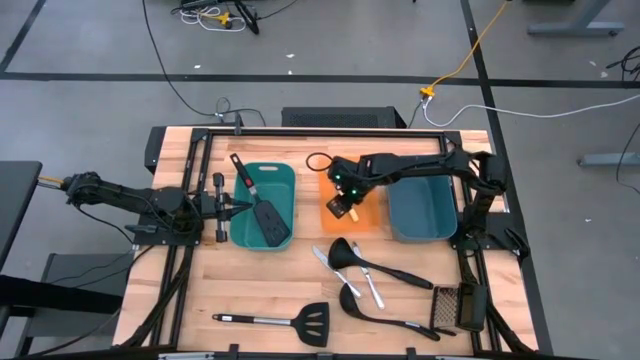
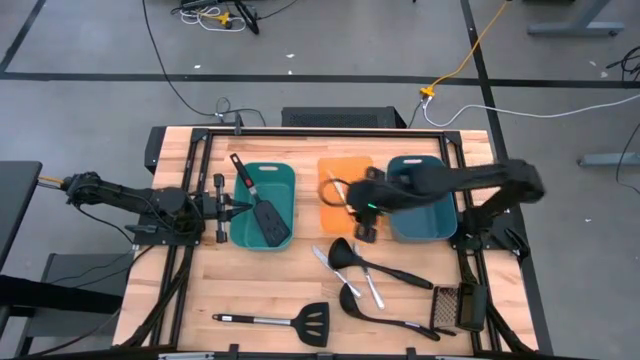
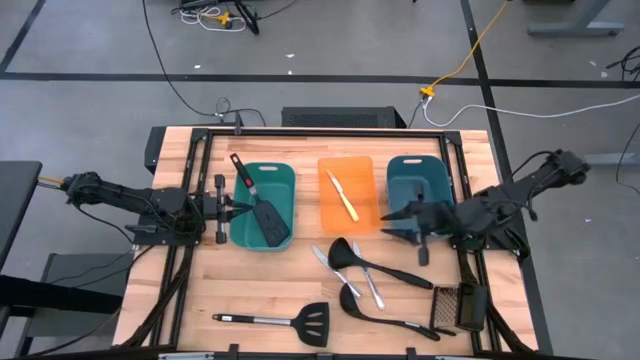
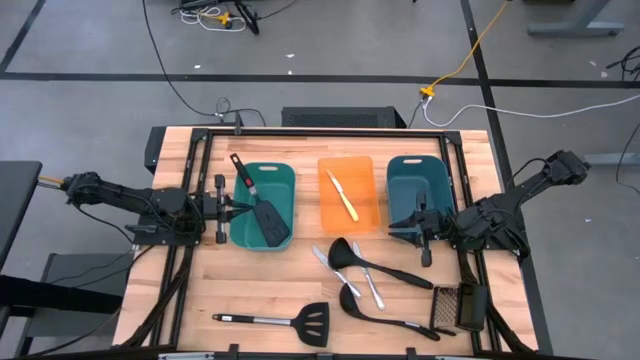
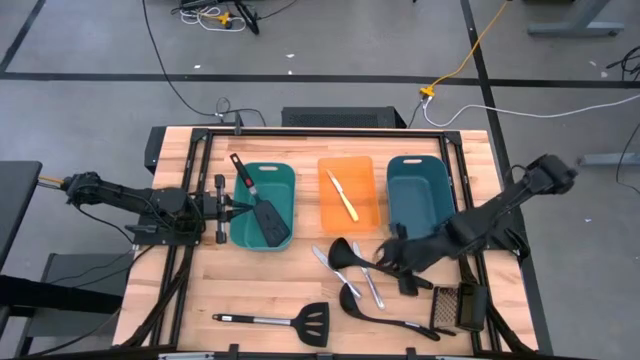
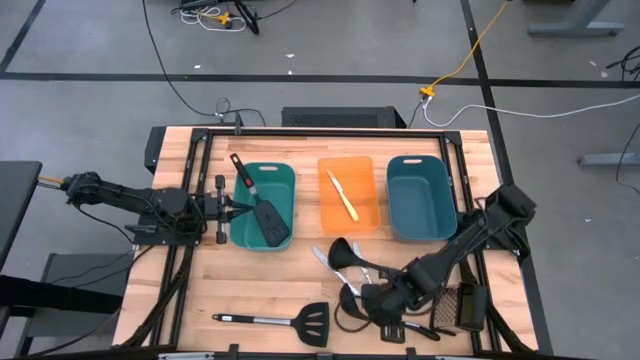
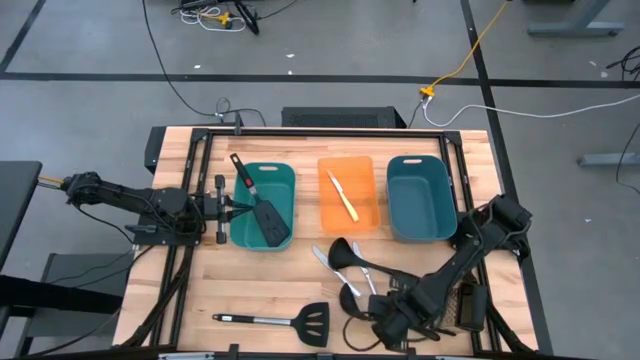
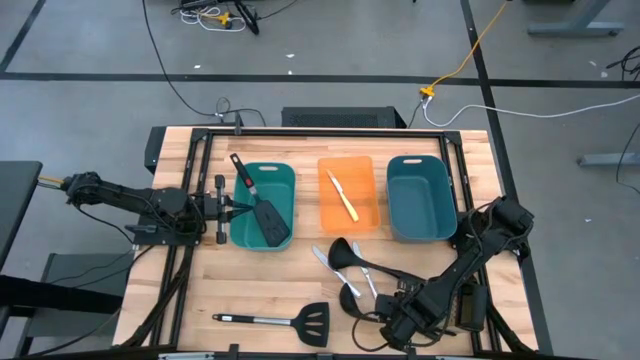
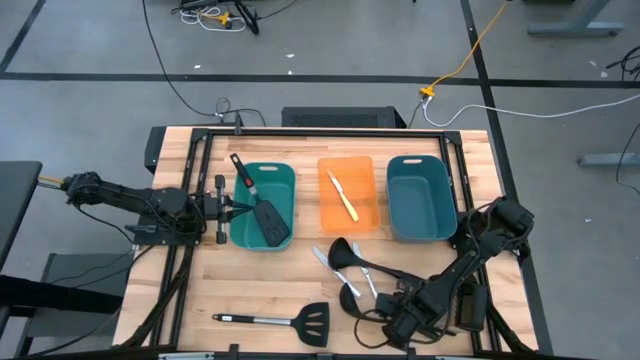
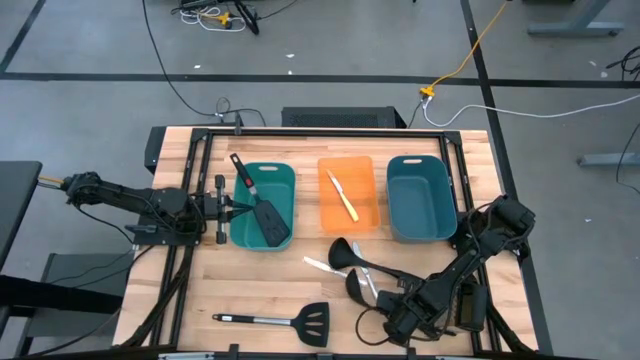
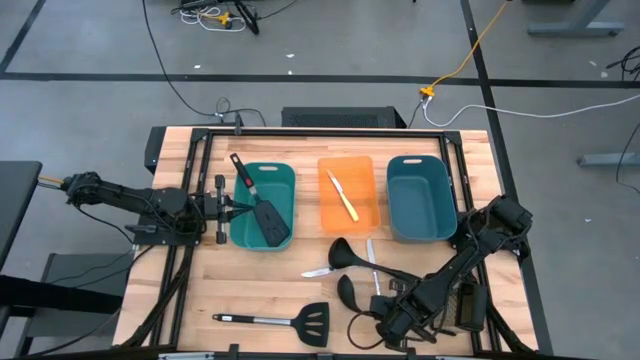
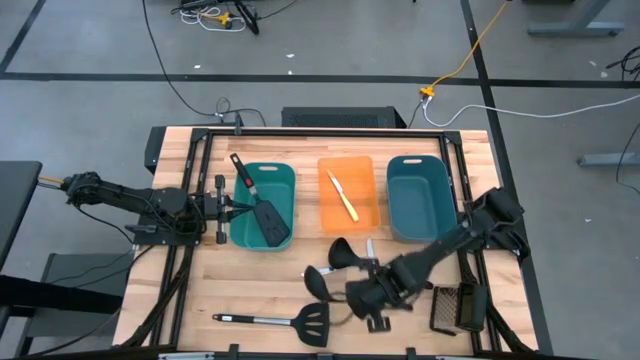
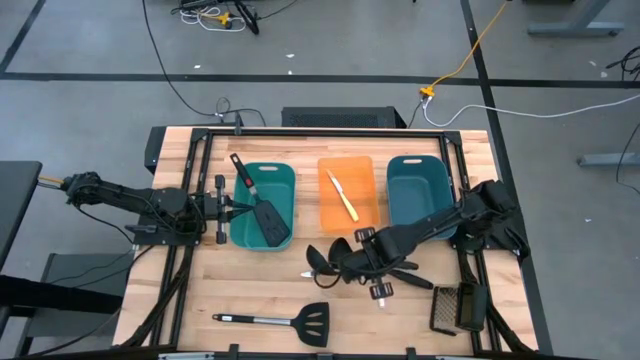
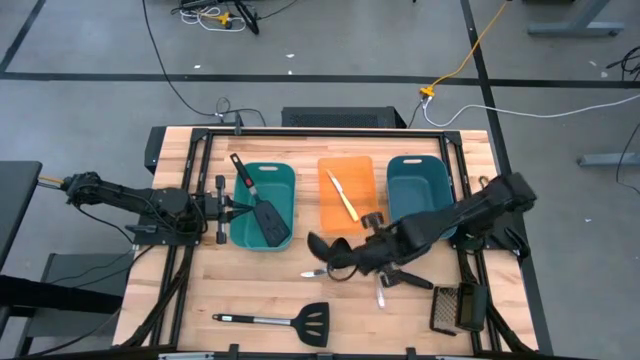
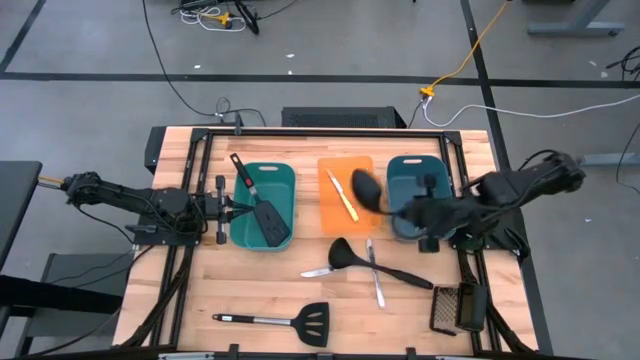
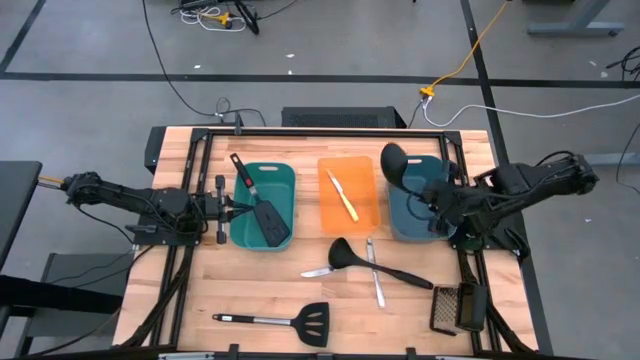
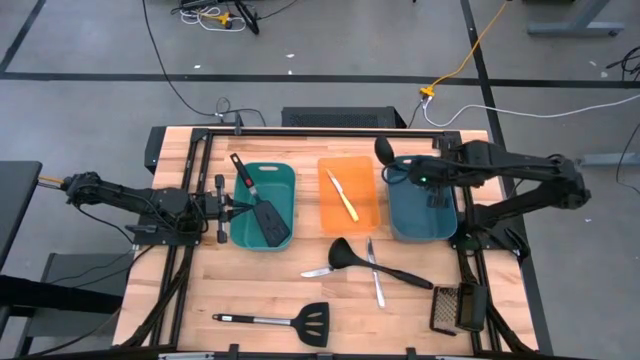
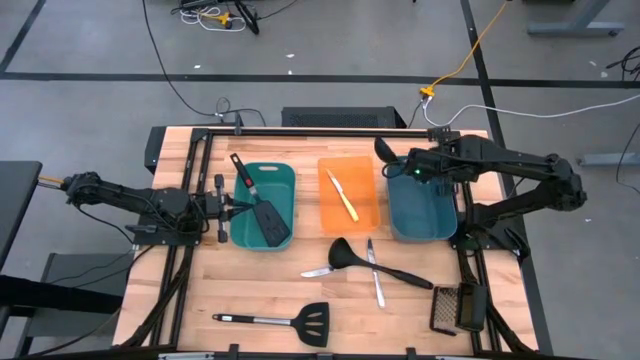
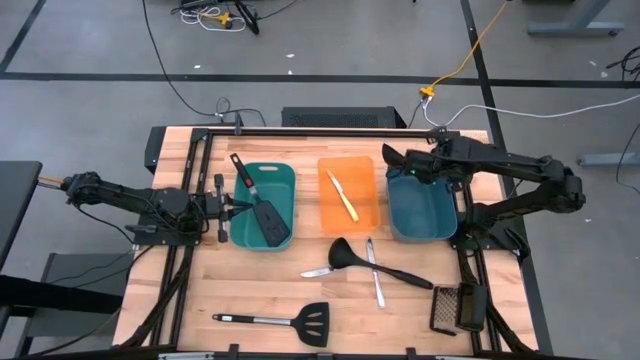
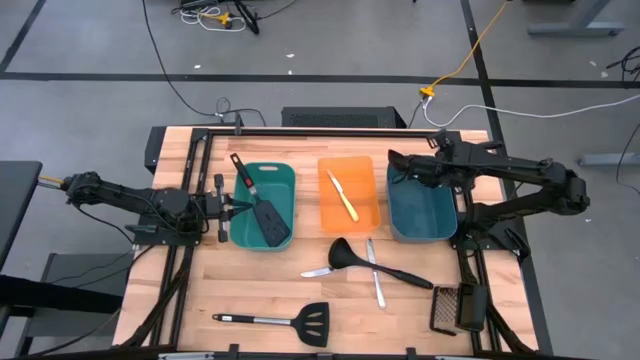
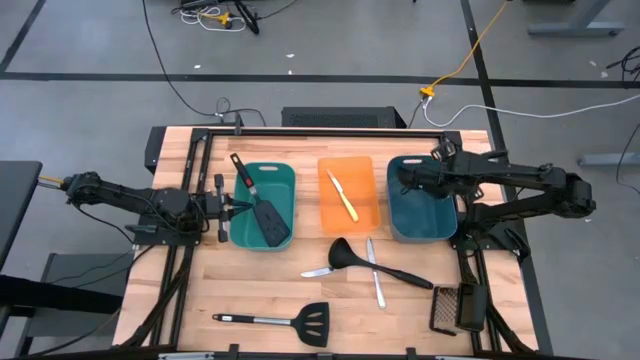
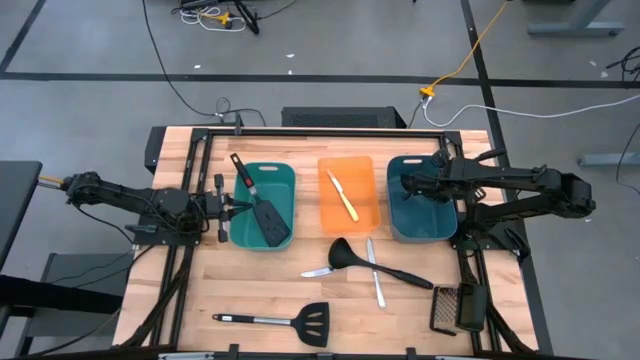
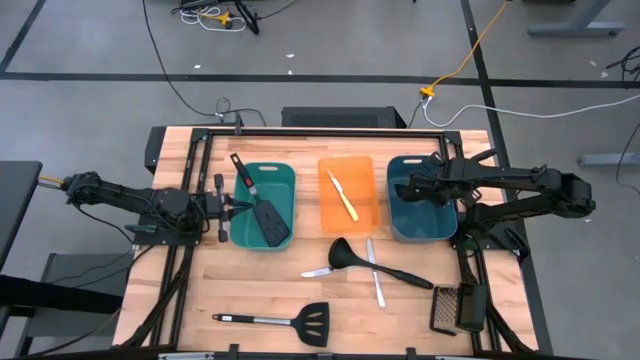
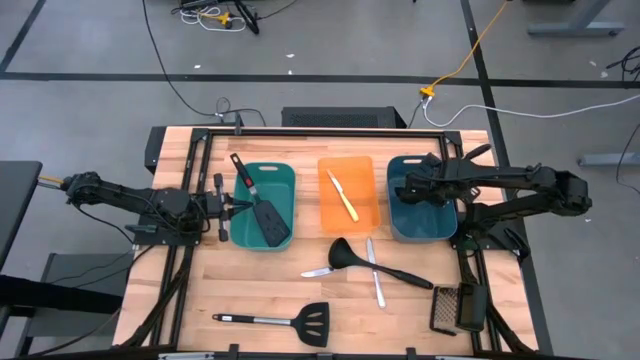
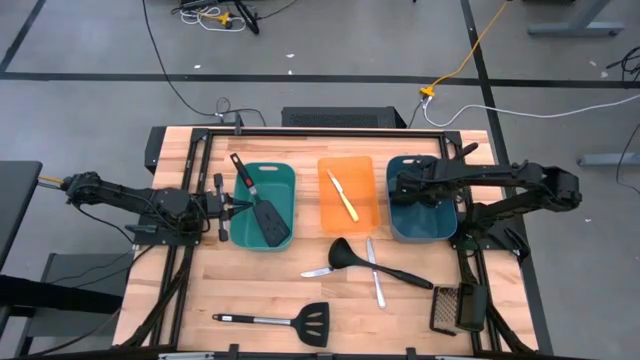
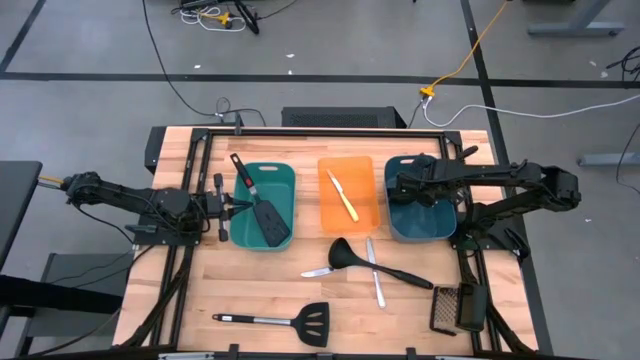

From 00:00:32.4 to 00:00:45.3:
Task: Pick & Place Kitchen Items
Put the bottom black serving spoon into the blue bin

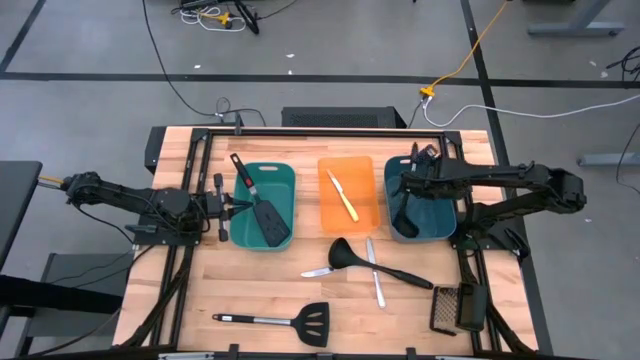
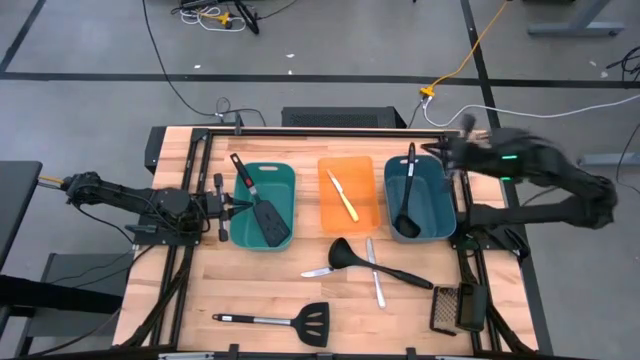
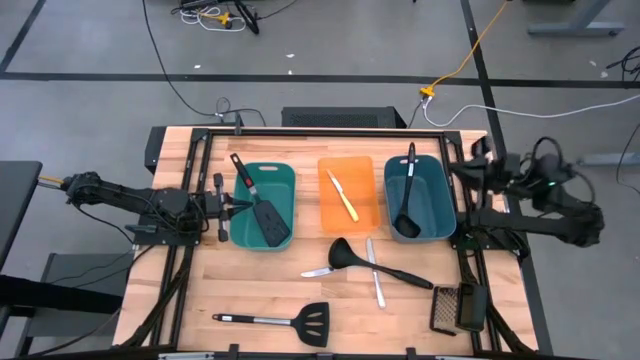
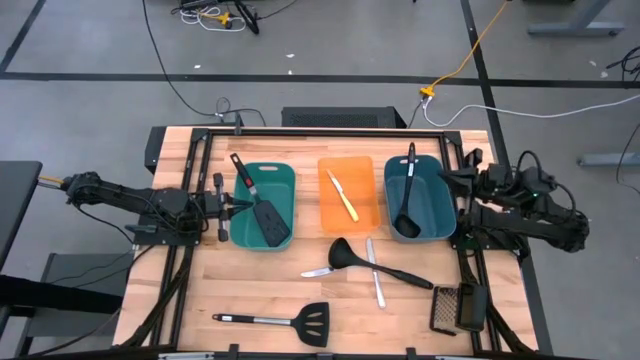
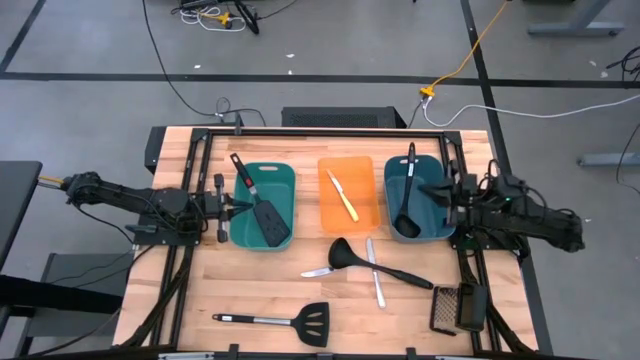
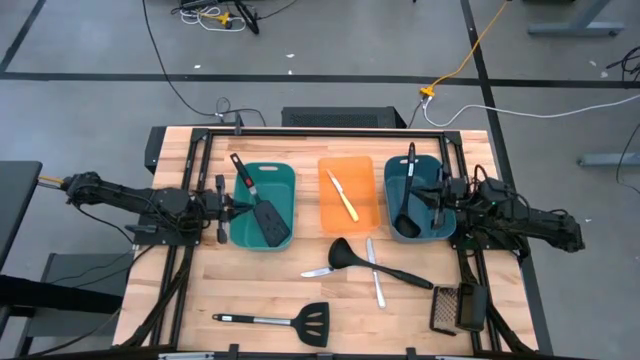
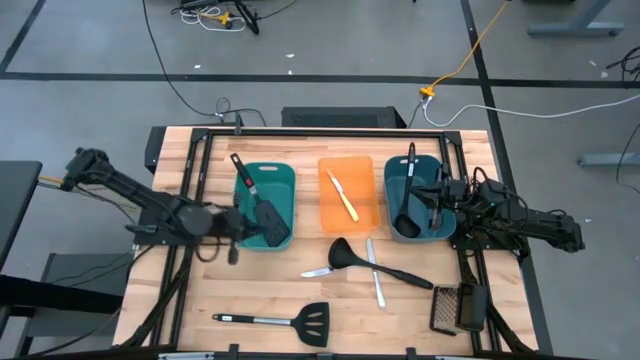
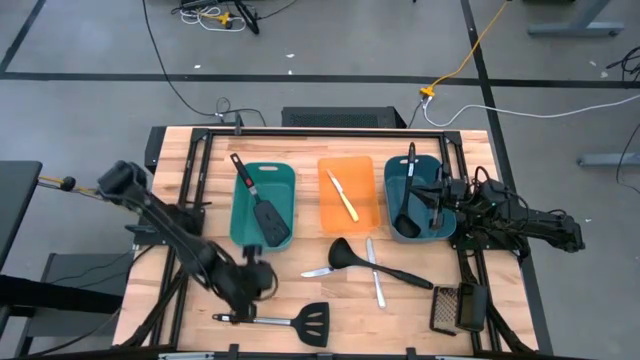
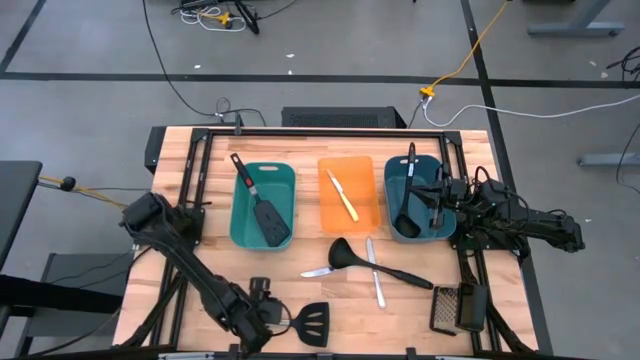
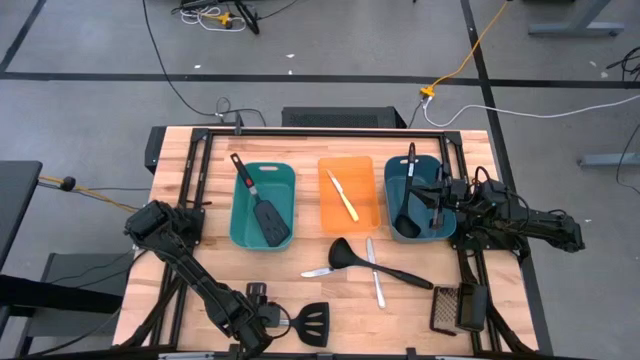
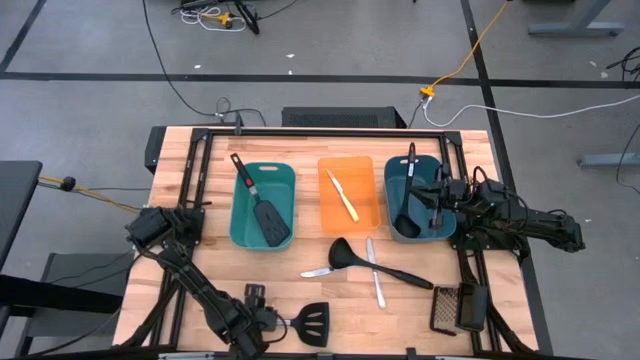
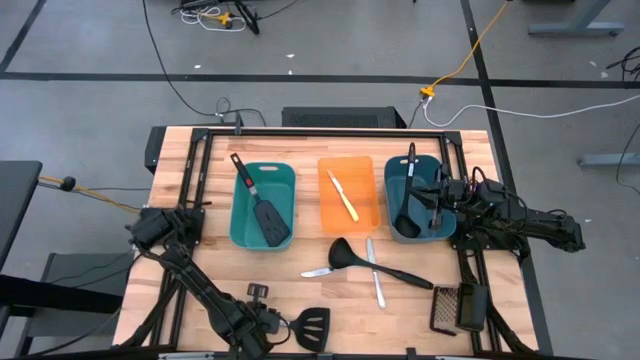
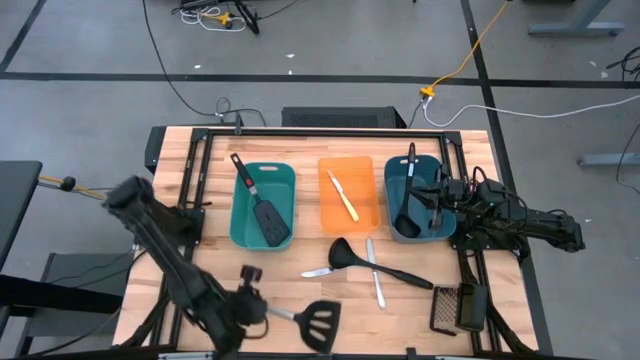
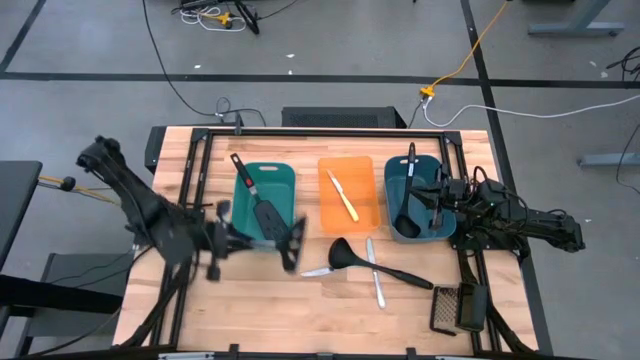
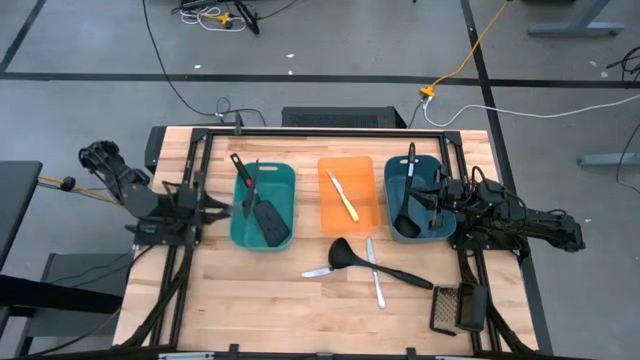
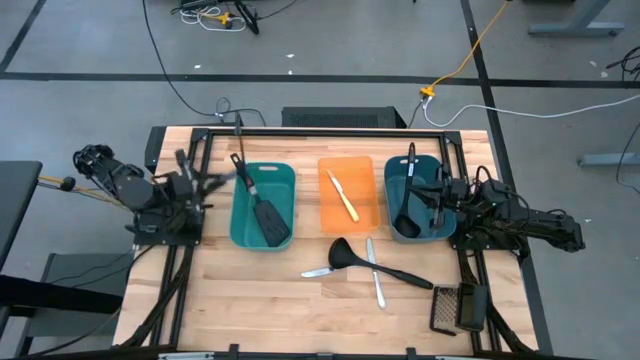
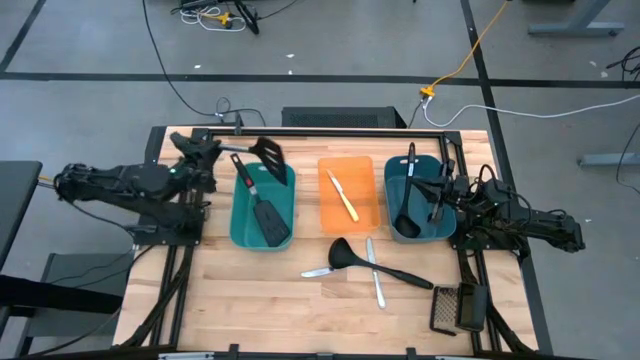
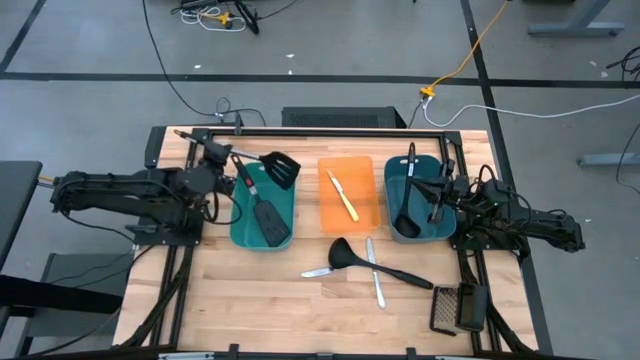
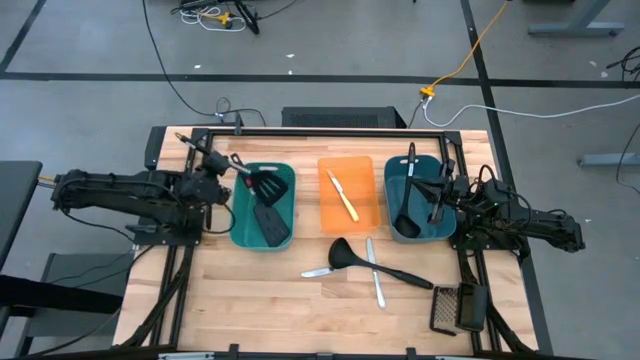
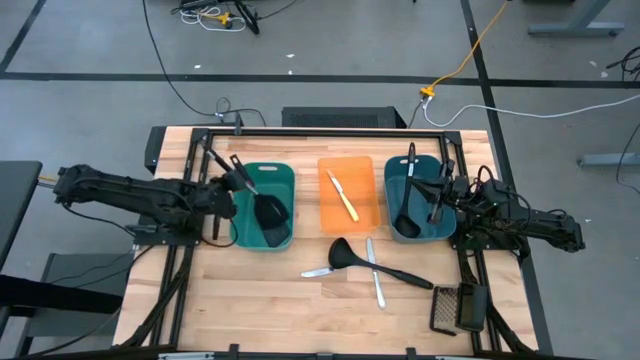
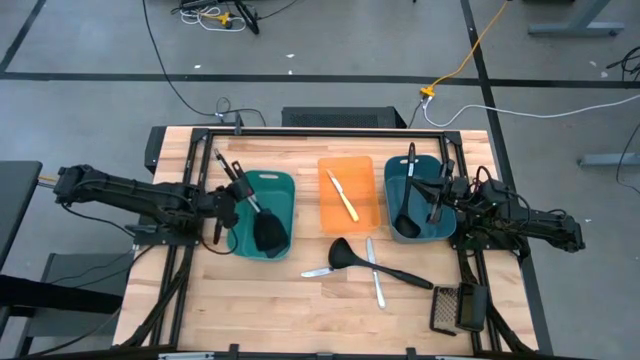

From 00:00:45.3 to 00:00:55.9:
Put the black spatula into the blue bin
